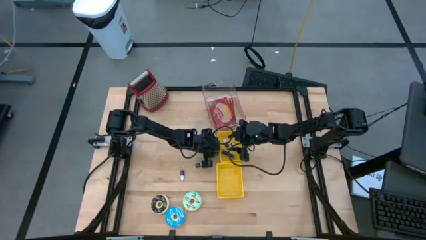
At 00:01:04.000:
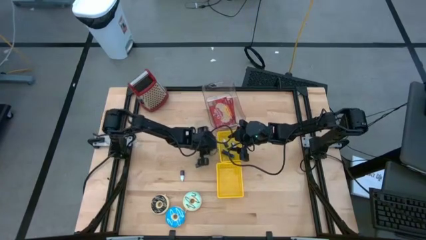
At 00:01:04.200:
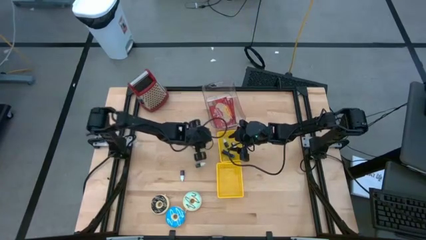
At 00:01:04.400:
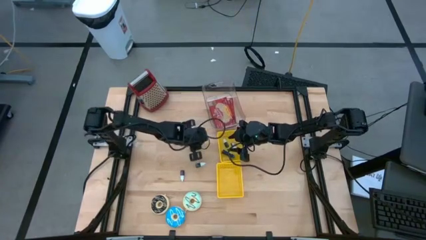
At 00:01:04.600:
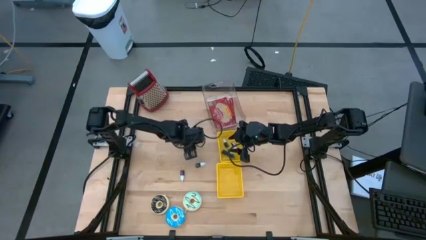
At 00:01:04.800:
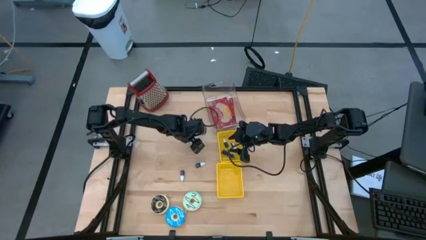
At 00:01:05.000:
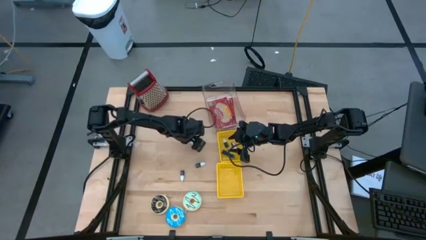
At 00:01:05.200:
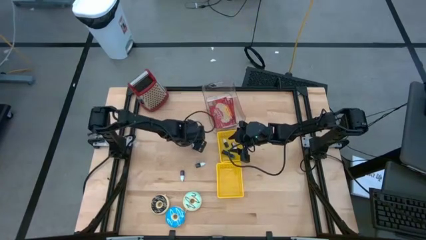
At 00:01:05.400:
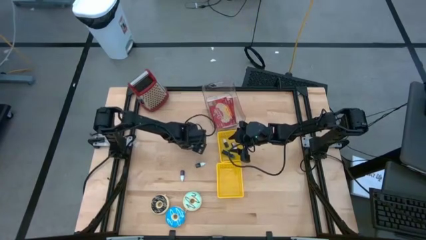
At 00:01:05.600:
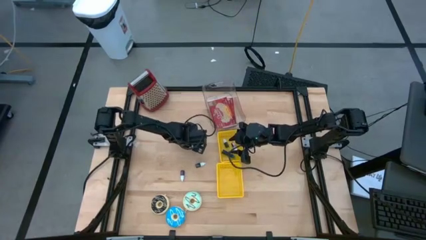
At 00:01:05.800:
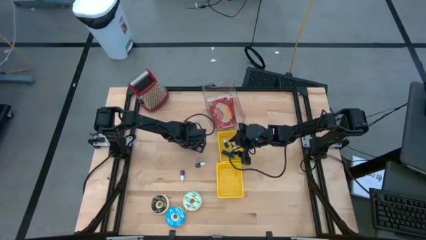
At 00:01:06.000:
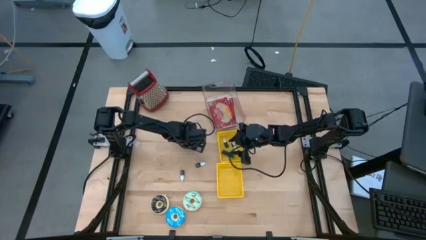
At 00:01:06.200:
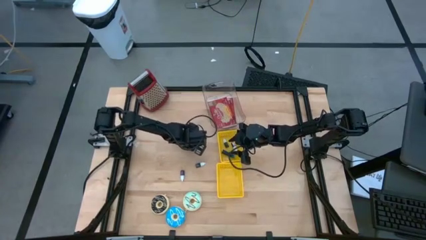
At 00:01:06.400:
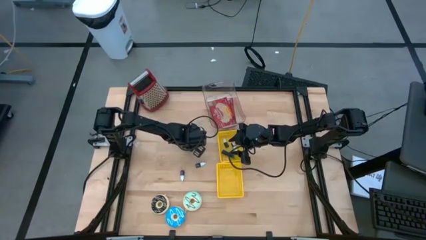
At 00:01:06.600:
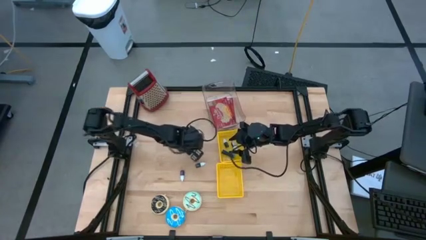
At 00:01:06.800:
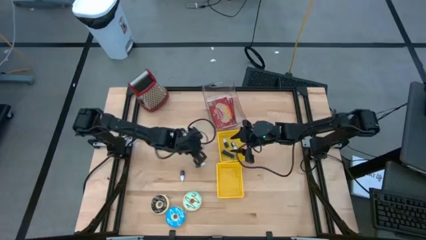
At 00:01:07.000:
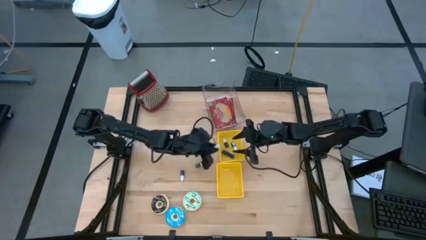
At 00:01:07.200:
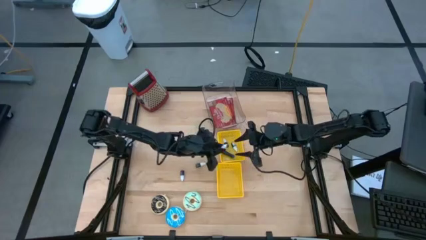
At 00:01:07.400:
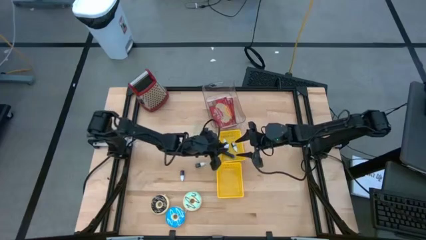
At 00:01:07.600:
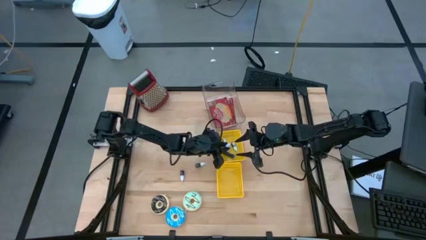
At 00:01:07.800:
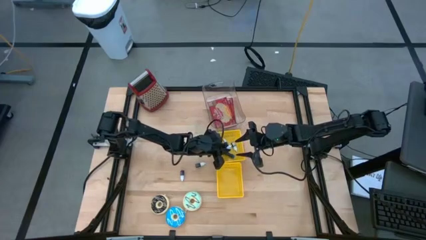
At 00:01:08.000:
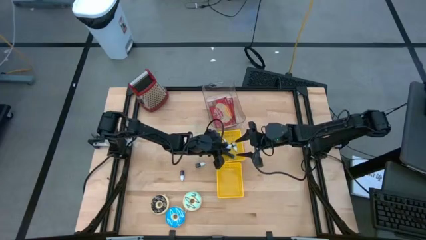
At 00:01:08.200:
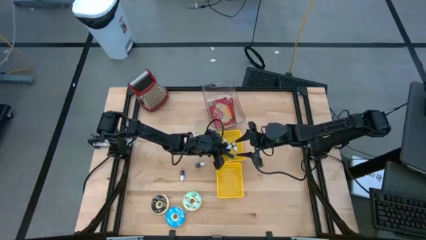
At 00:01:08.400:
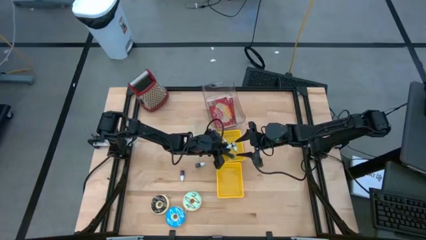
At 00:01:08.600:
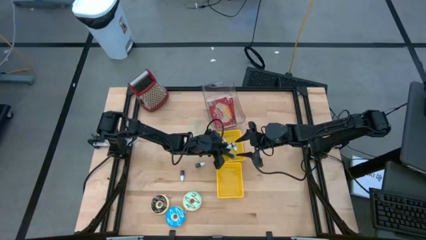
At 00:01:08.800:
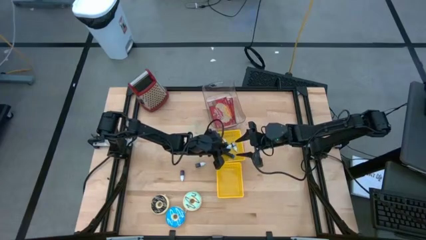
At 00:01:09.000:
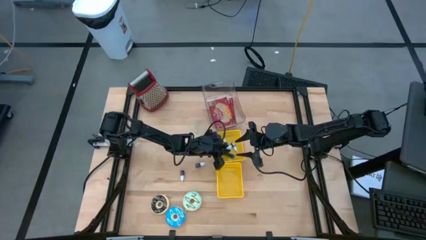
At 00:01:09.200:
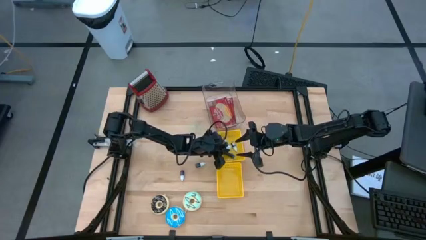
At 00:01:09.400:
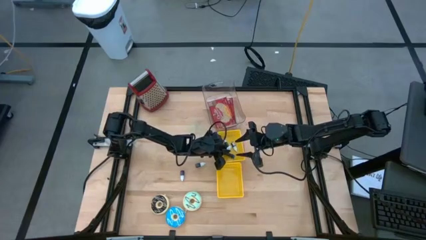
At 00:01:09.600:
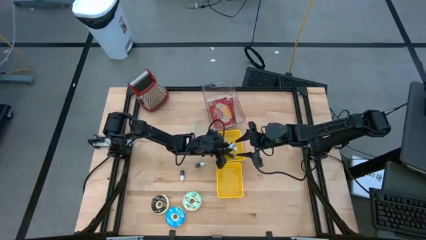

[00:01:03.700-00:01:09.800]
Put the blue food coloring bottle into the top yellow bin

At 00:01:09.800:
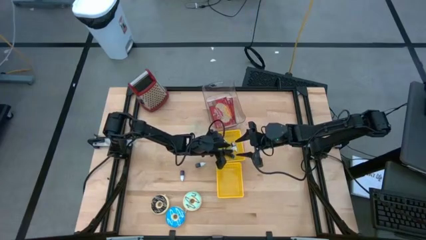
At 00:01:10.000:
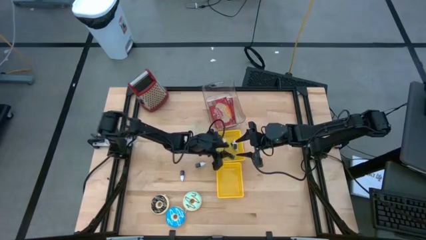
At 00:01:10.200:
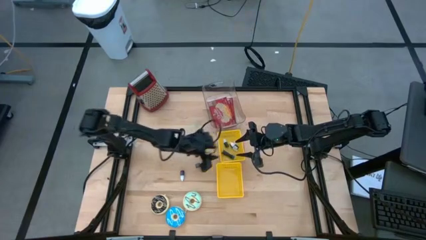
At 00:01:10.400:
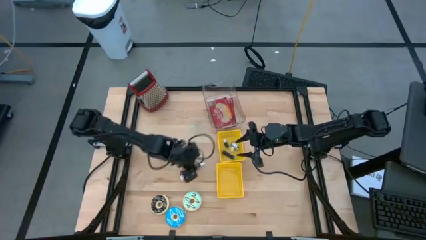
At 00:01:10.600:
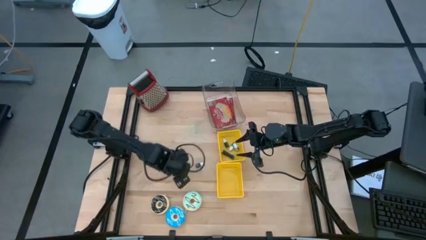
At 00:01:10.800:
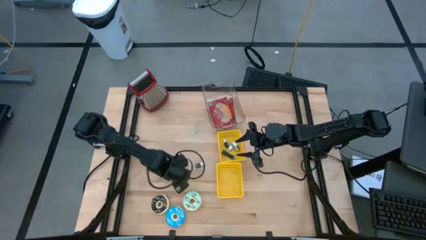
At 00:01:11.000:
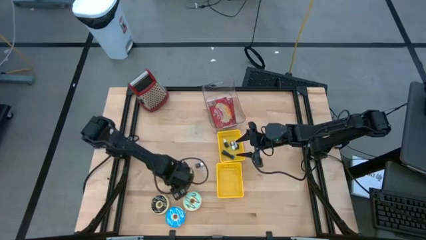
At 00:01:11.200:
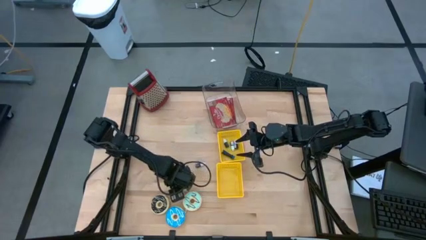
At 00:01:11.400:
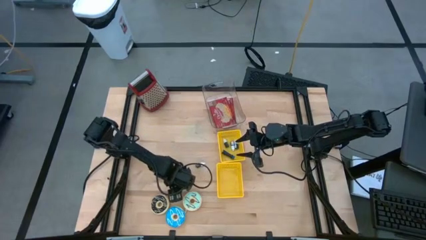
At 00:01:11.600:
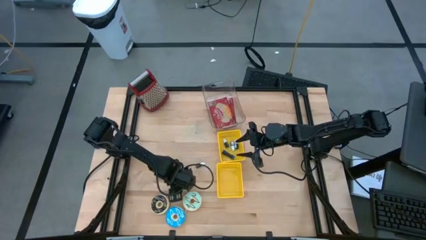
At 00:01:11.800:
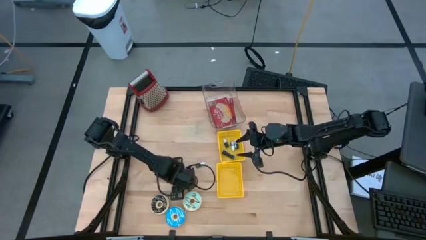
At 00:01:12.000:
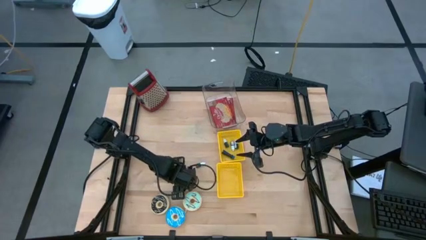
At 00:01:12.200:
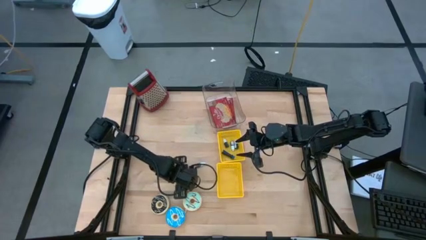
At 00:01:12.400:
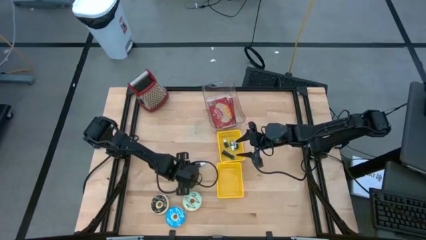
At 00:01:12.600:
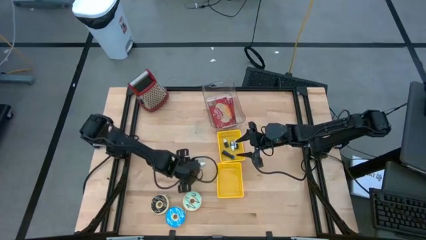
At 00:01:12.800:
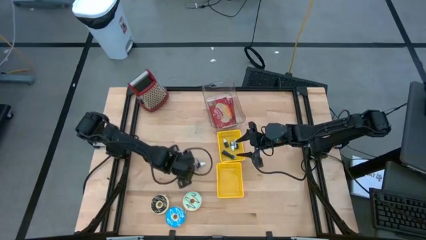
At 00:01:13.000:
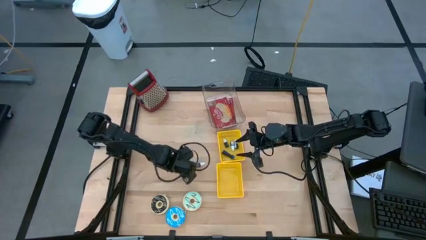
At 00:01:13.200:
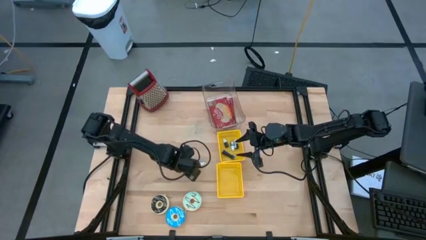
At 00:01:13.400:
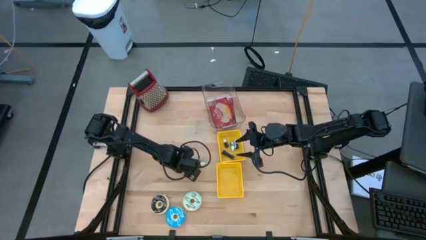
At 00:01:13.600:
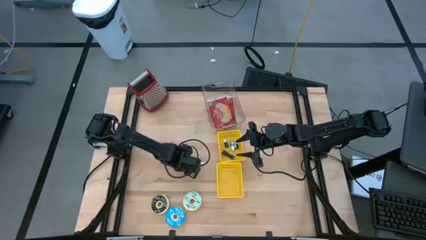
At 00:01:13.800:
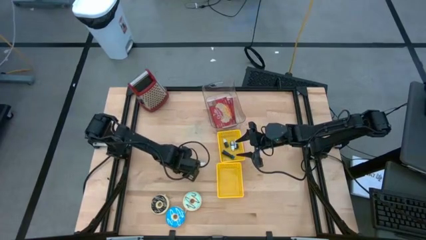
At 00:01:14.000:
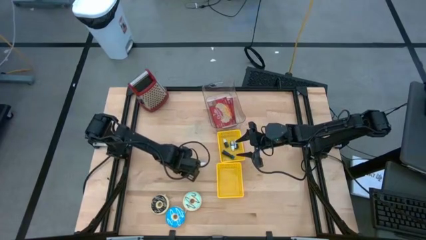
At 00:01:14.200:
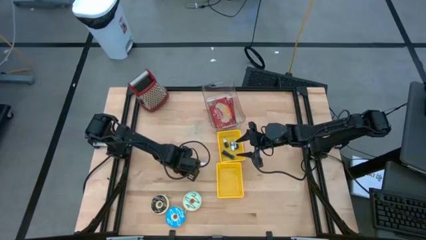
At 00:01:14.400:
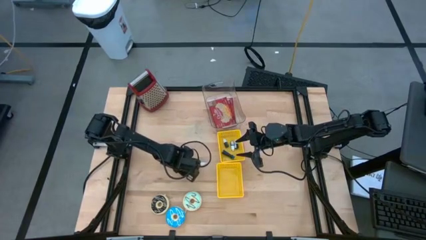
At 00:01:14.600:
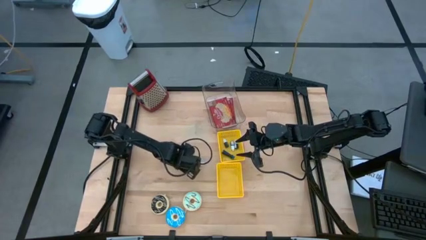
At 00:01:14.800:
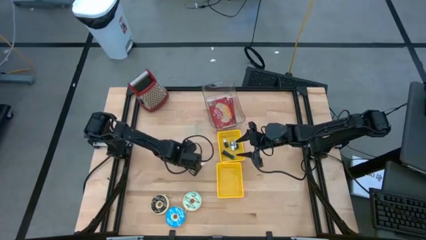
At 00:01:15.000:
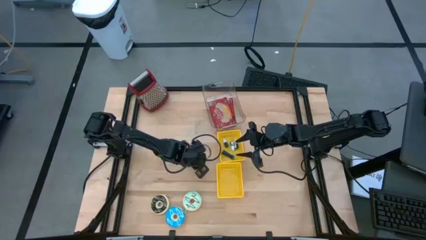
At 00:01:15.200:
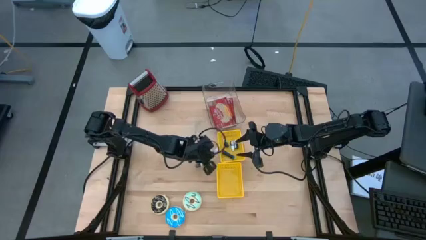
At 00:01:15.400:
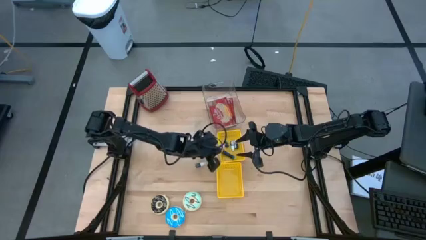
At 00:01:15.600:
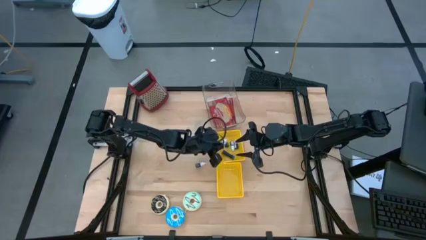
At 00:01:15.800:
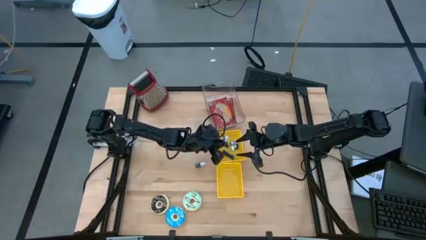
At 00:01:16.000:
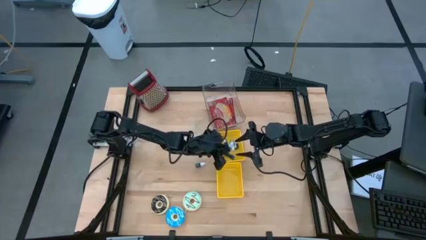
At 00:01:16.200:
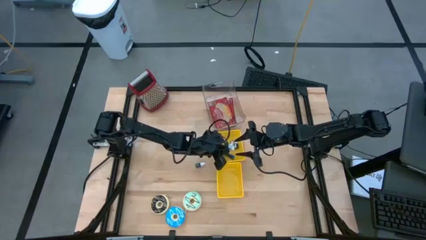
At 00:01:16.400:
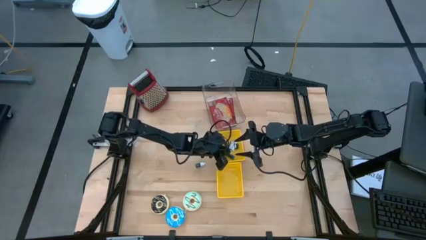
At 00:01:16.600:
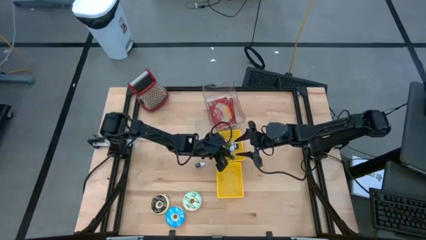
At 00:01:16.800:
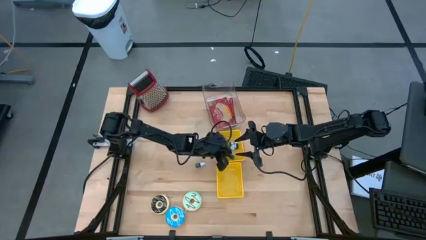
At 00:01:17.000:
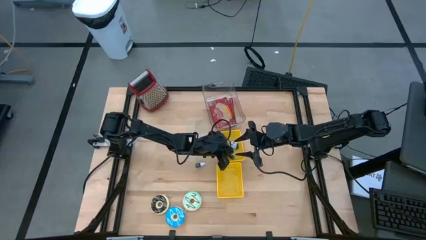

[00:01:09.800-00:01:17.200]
Put the purple food coloring bottle into the top yellow bin
